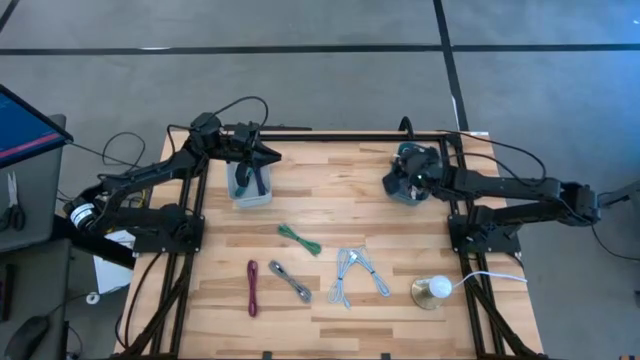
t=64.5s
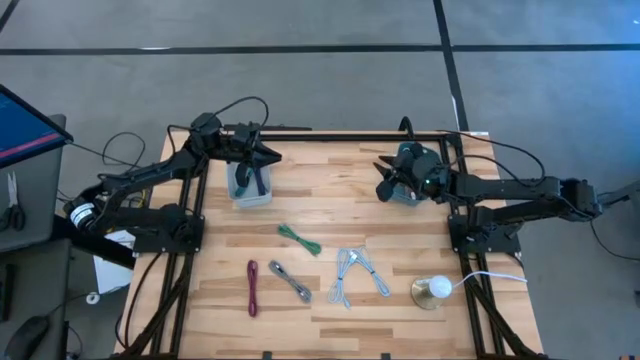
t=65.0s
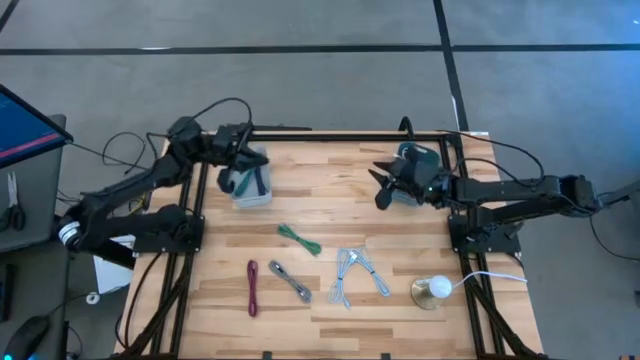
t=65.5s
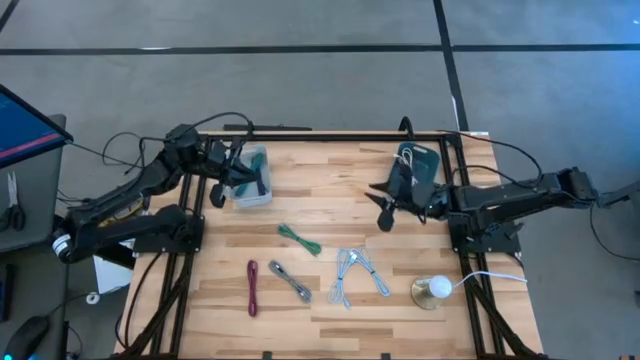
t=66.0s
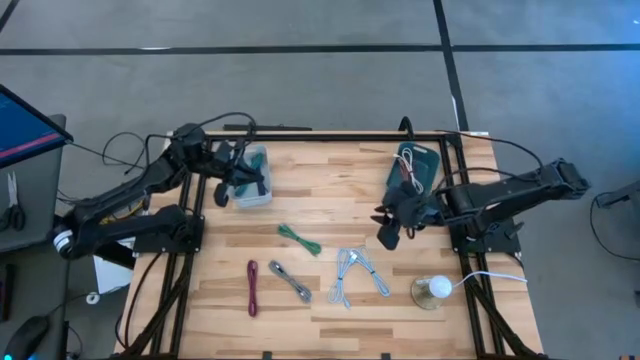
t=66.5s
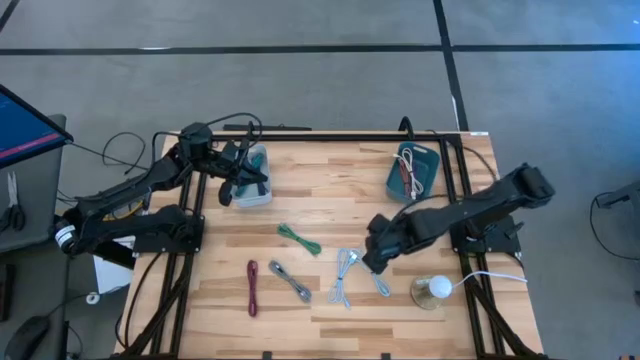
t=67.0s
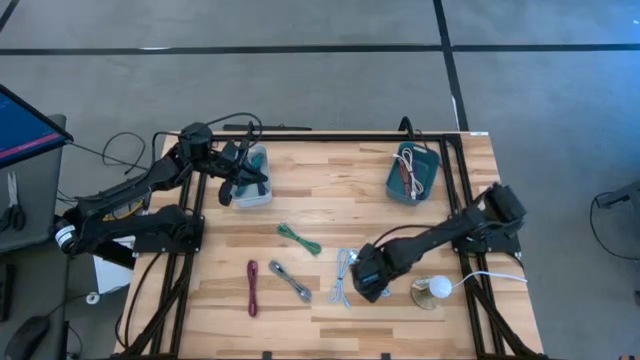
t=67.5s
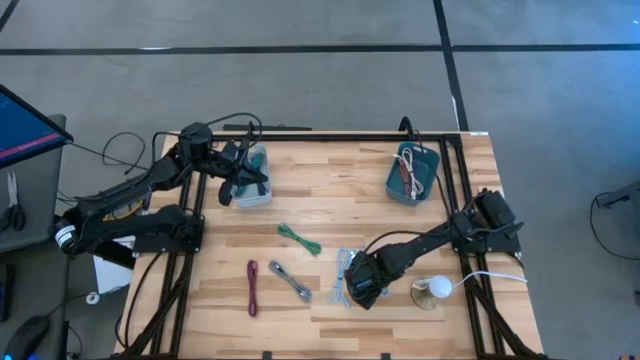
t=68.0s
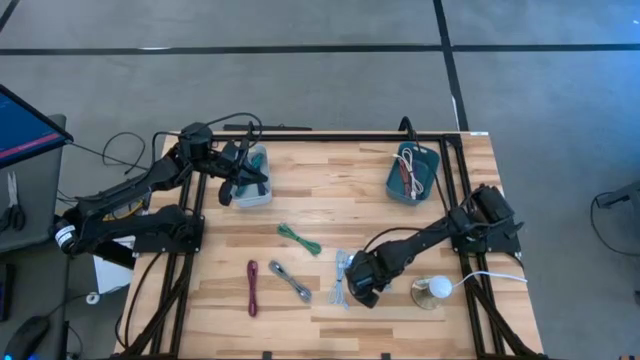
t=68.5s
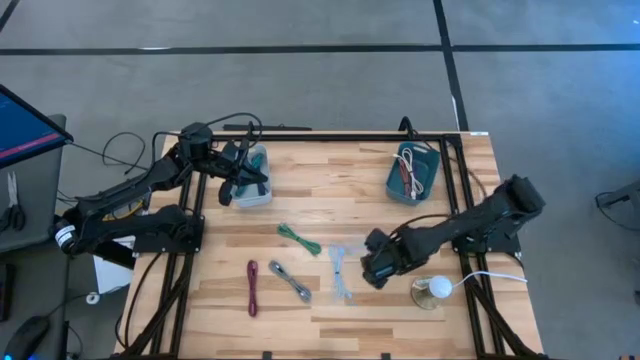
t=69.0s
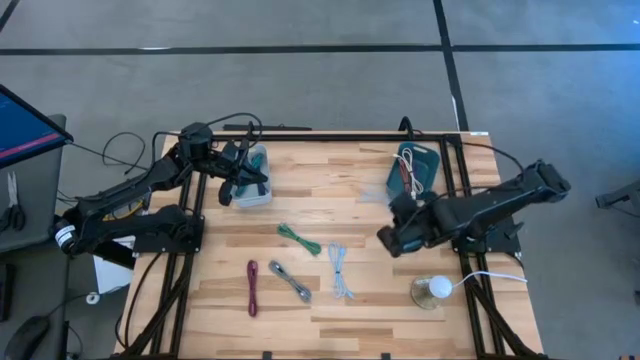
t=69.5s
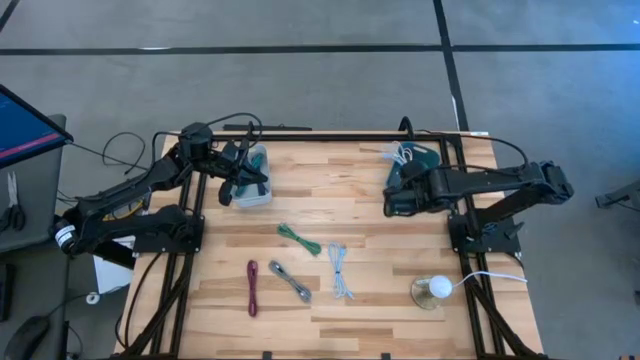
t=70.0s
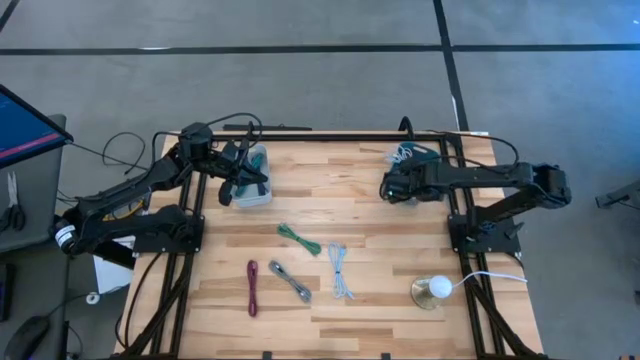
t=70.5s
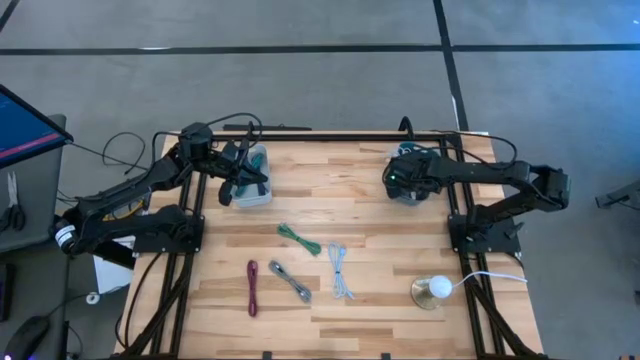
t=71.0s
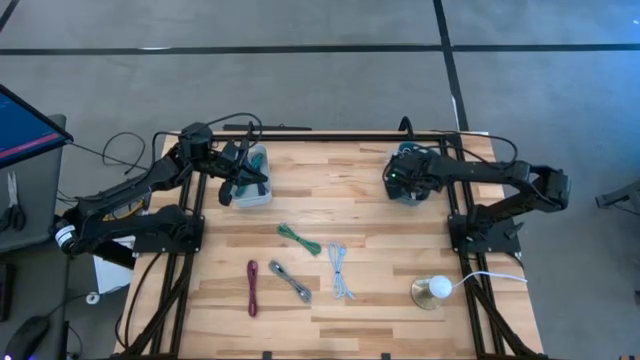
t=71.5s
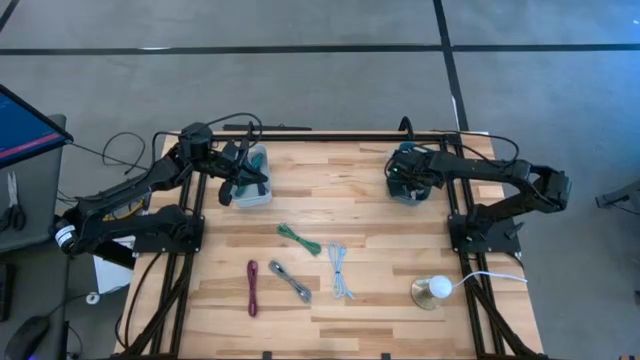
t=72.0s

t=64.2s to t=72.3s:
Task: Pick & Place USB Port
Put the blue USB cable into the blue bin

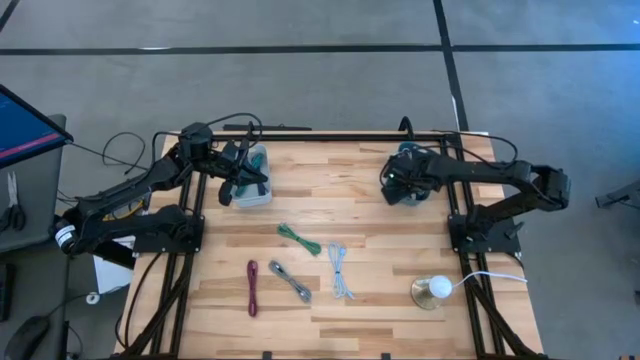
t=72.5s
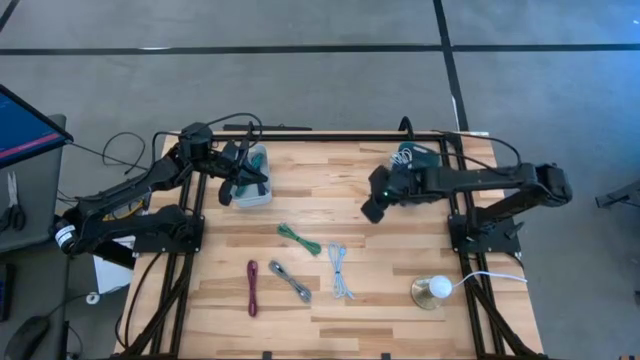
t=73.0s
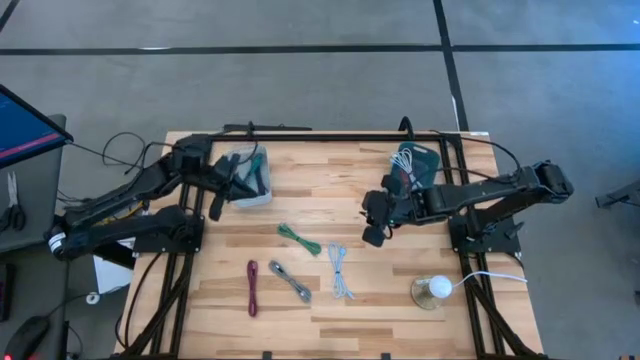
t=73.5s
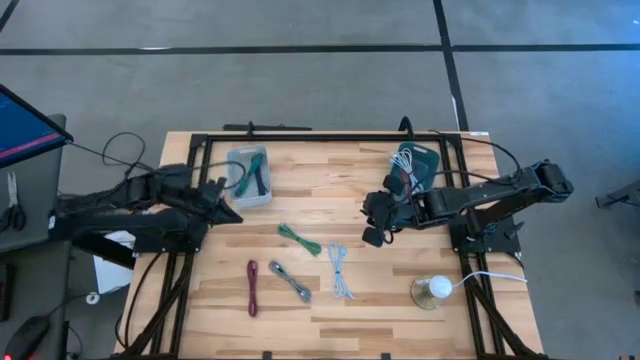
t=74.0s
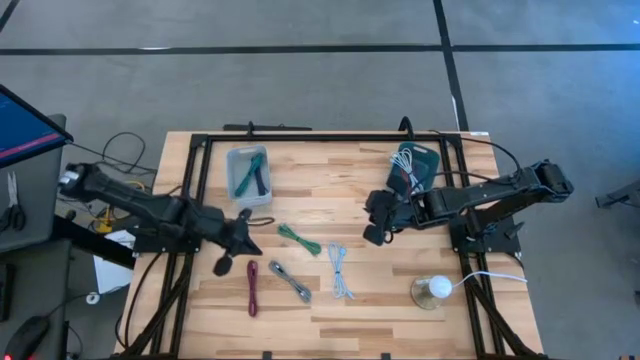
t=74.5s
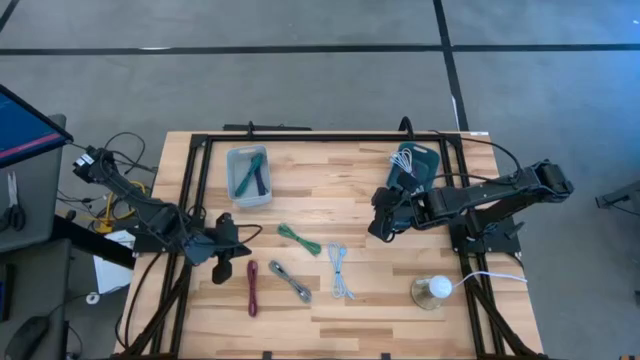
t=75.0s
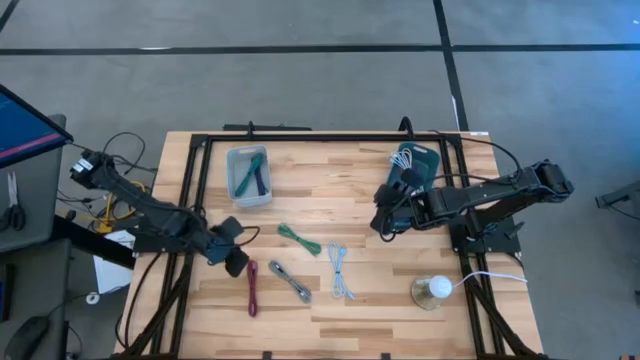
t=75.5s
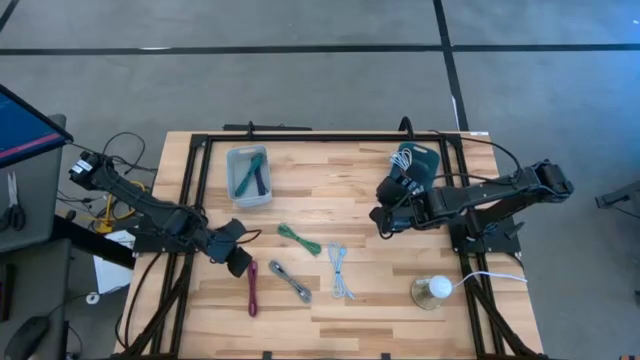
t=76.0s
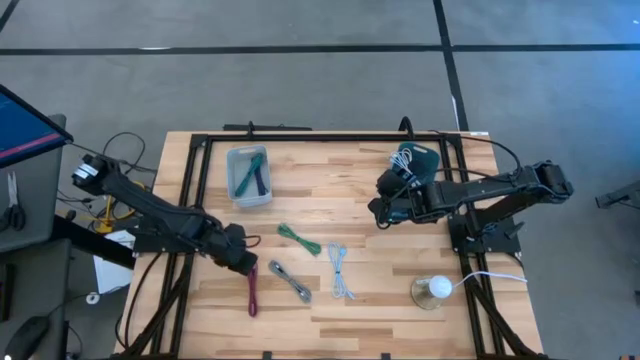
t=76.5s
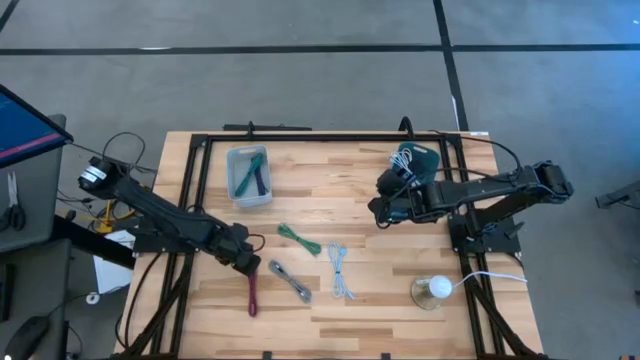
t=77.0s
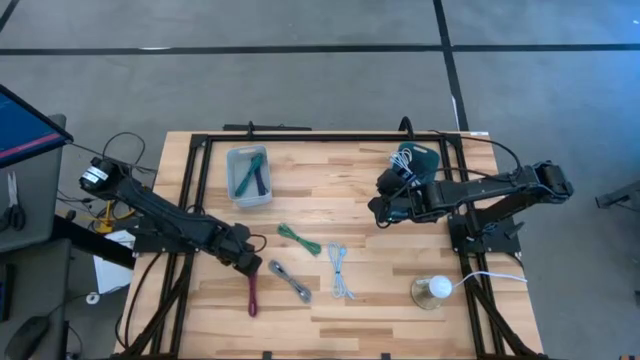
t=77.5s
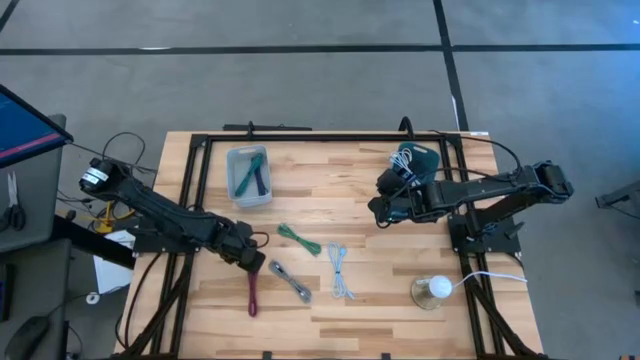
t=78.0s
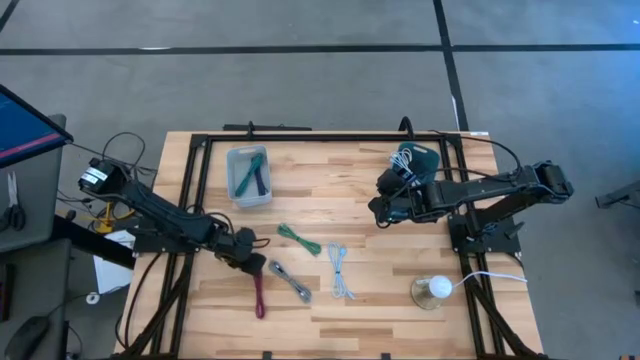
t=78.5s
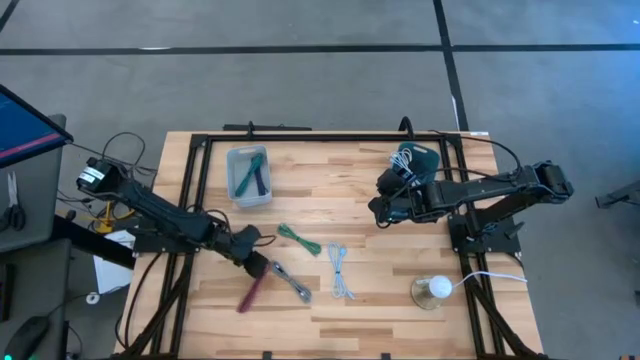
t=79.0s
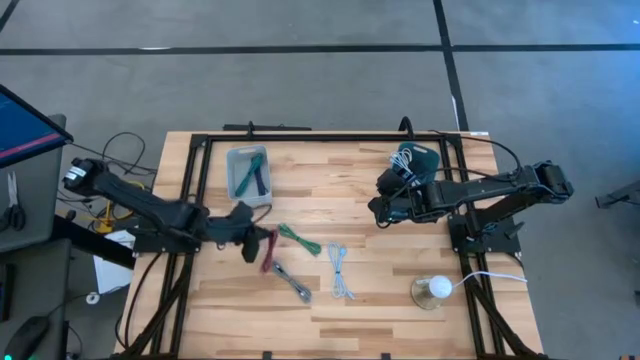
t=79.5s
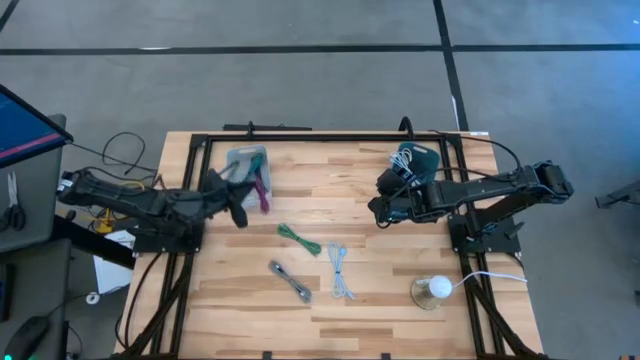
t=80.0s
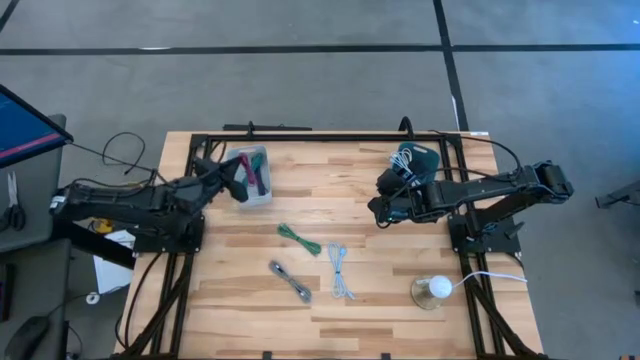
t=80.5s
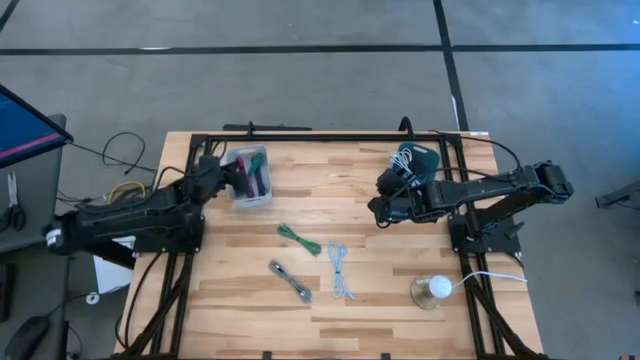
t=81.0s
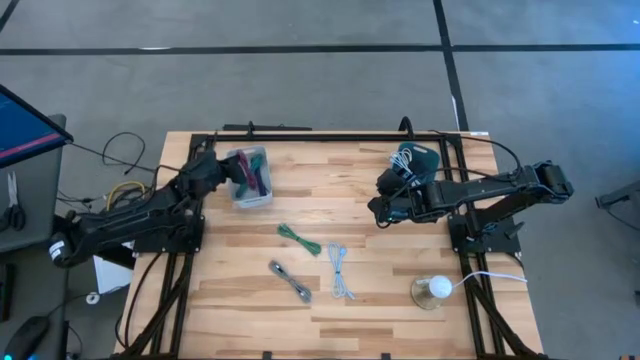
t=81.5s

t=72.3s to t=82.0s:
Put the pink patterned USB cable into the gray bin

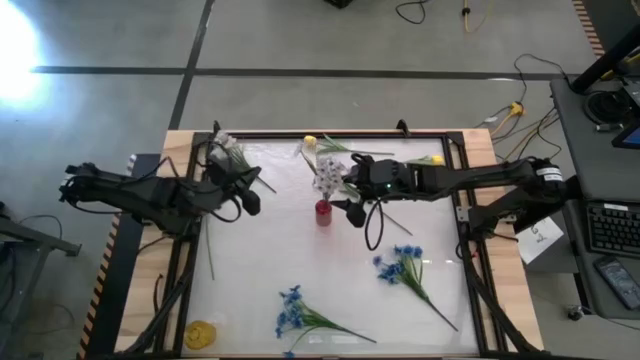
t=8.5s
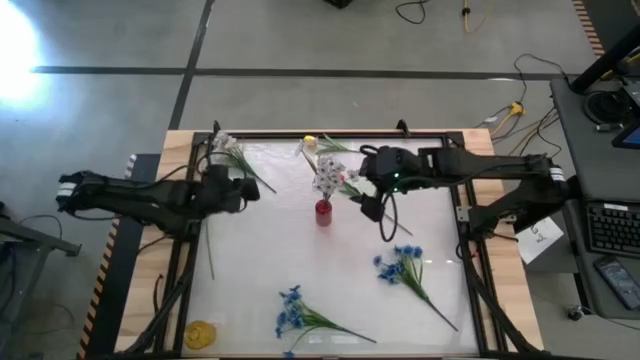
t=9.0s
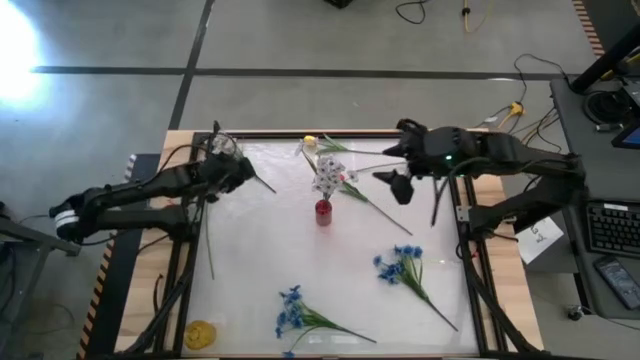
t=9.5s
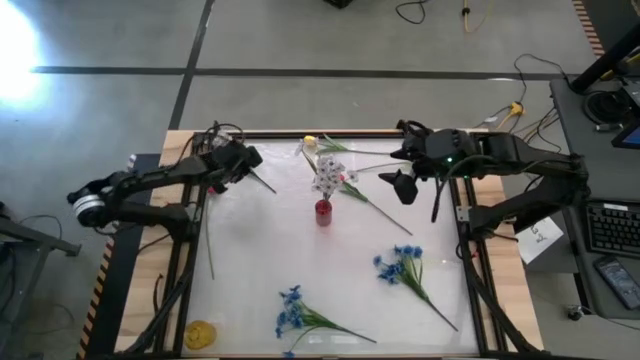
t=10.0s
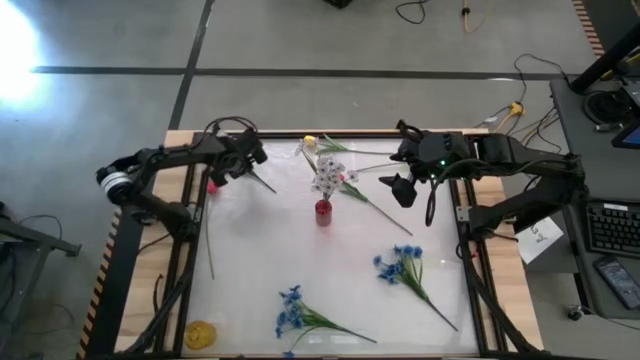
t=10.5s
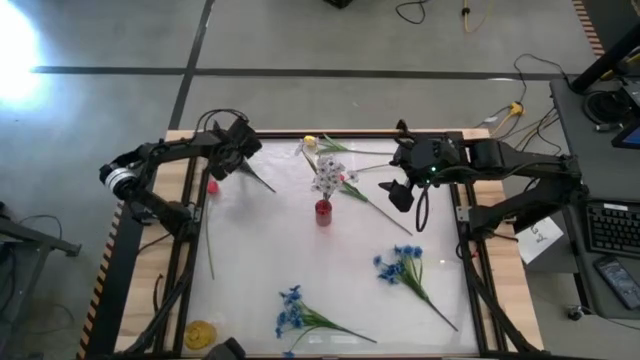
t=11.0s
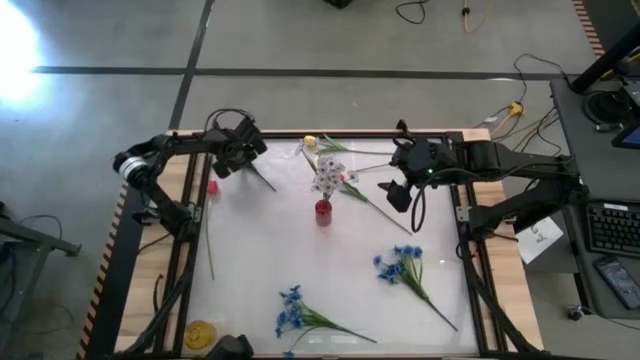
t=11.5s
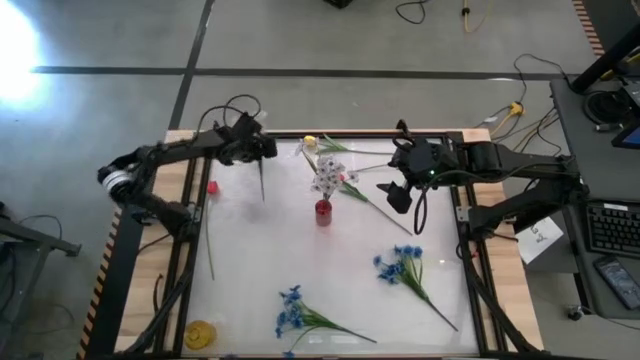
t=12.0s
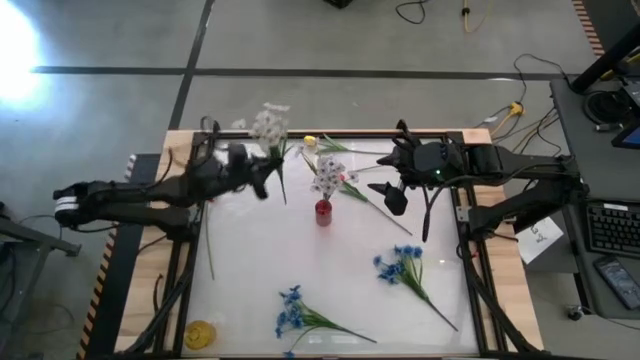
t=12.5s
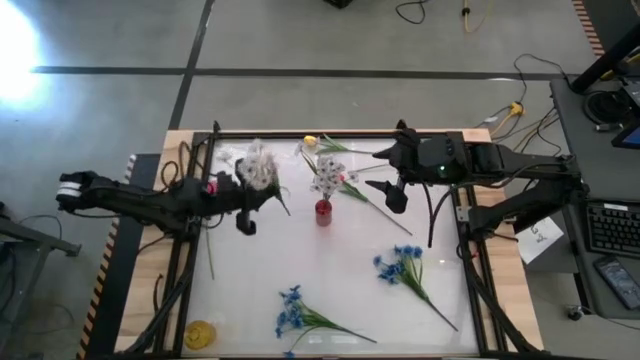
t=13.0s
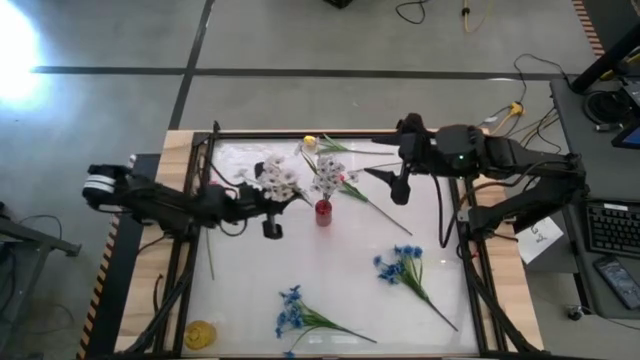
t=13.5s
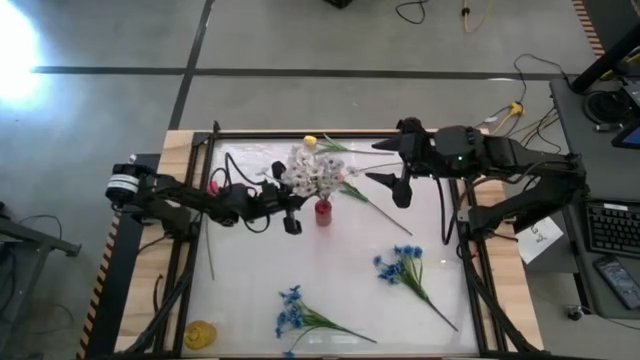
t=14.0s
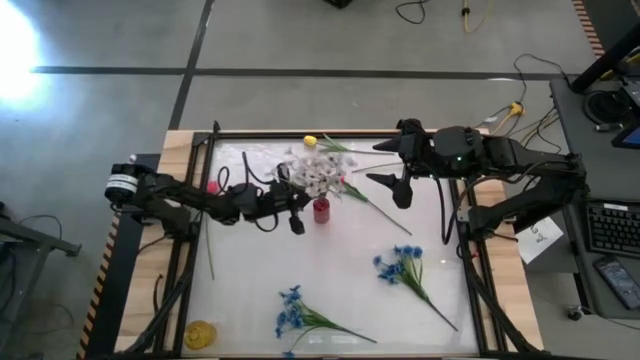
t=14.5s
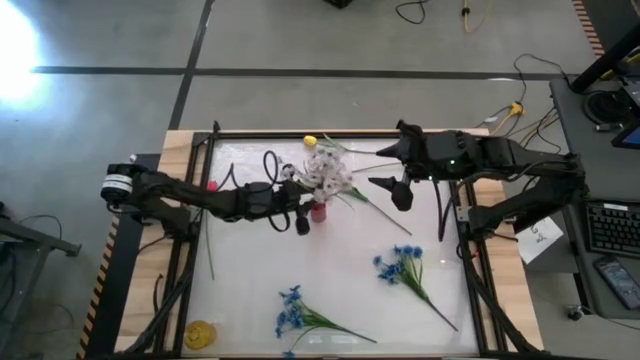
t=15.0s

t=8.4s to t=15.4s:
Task: Sort flowers into vase by color
Put the white flower into the red flower vase
